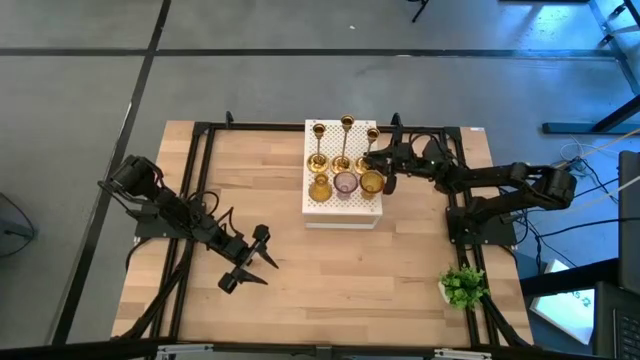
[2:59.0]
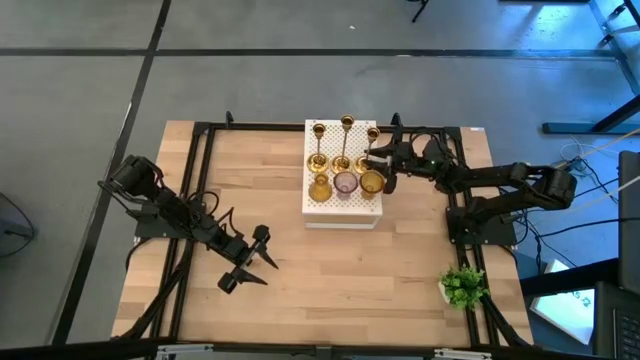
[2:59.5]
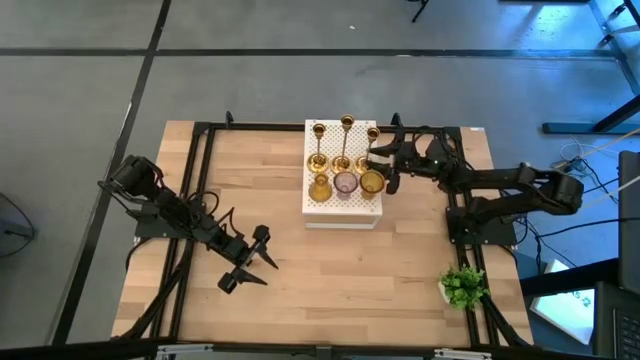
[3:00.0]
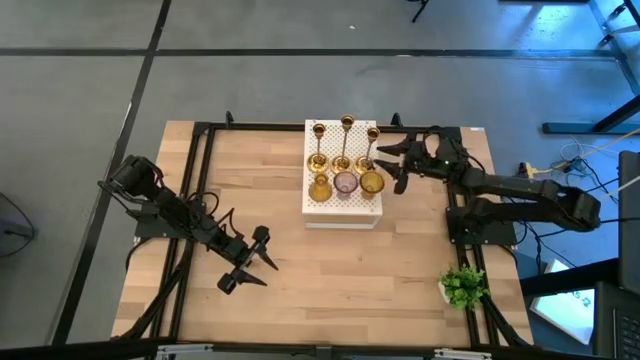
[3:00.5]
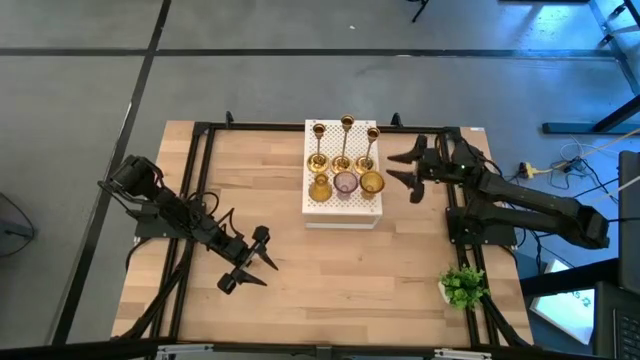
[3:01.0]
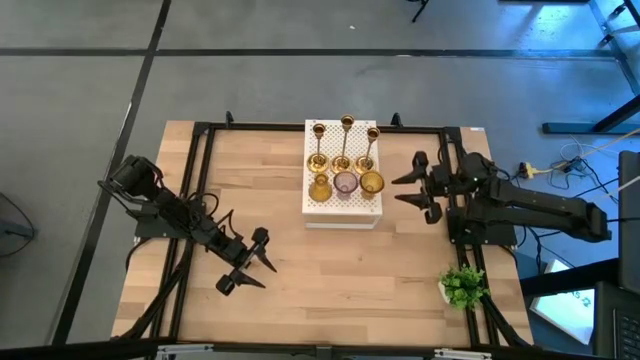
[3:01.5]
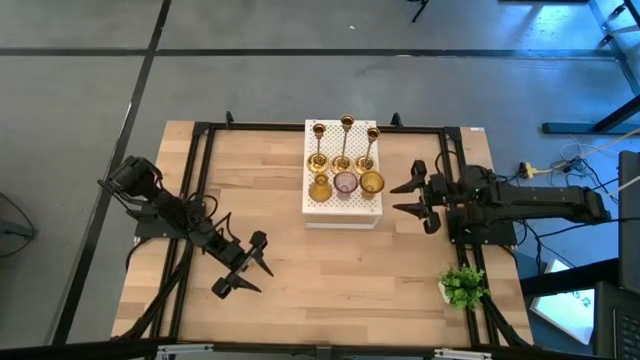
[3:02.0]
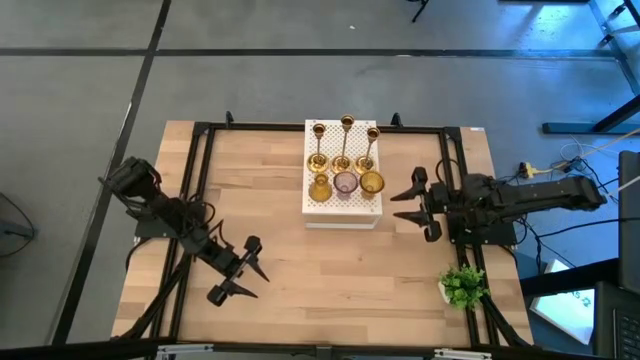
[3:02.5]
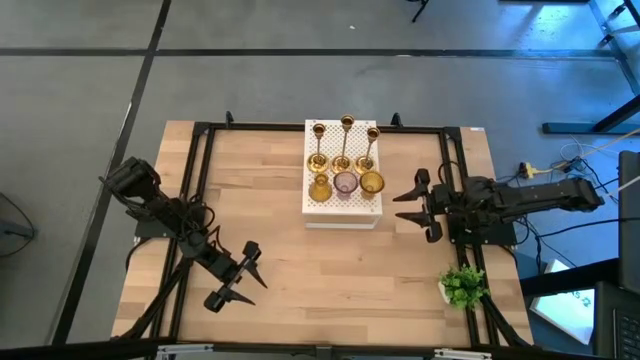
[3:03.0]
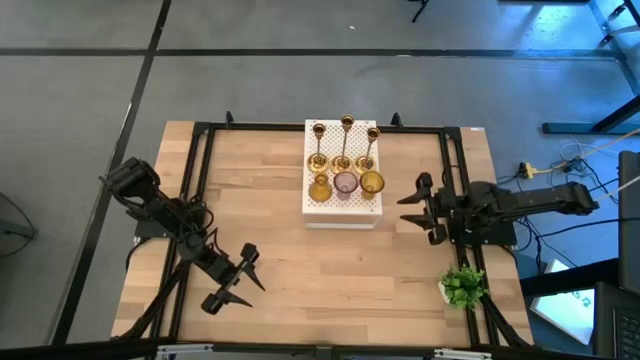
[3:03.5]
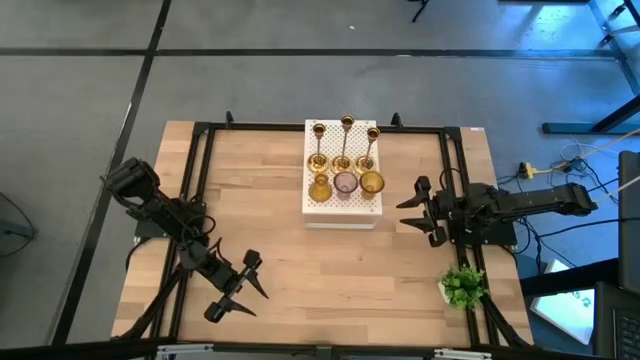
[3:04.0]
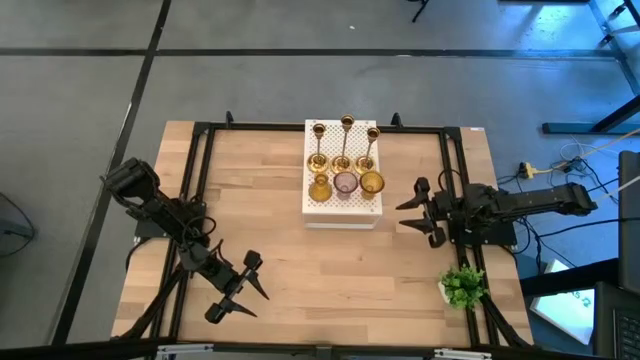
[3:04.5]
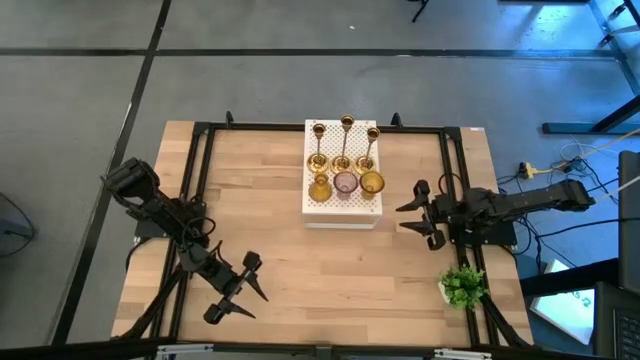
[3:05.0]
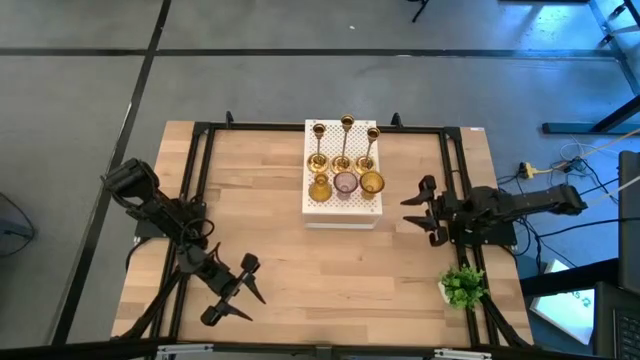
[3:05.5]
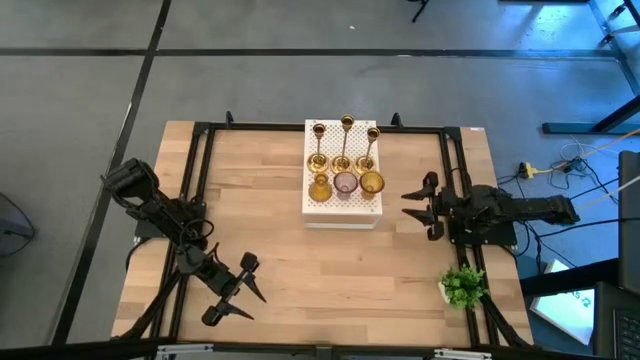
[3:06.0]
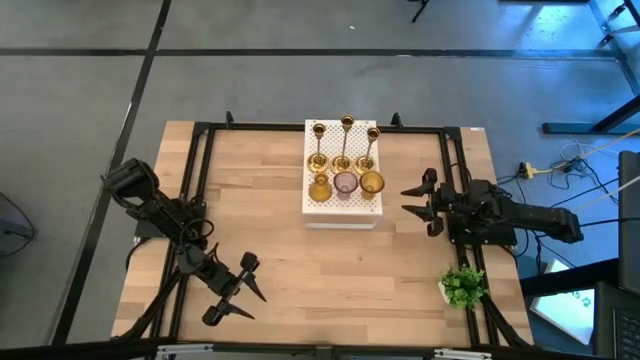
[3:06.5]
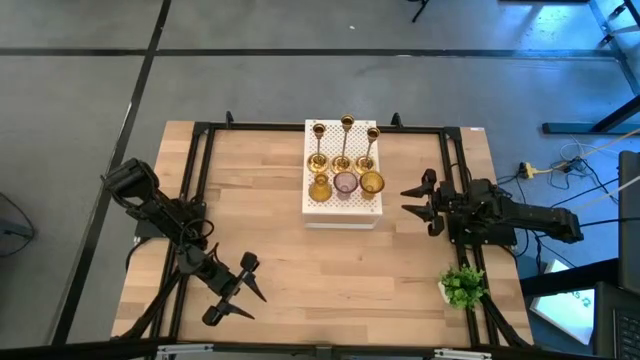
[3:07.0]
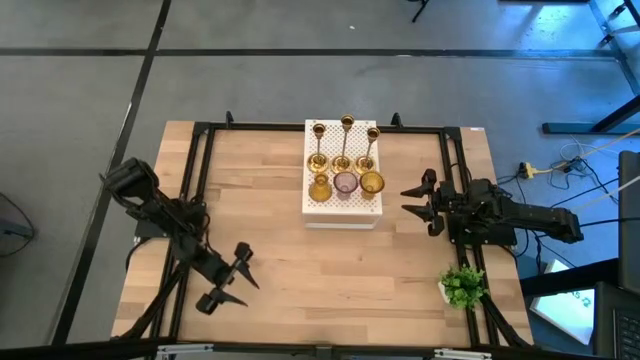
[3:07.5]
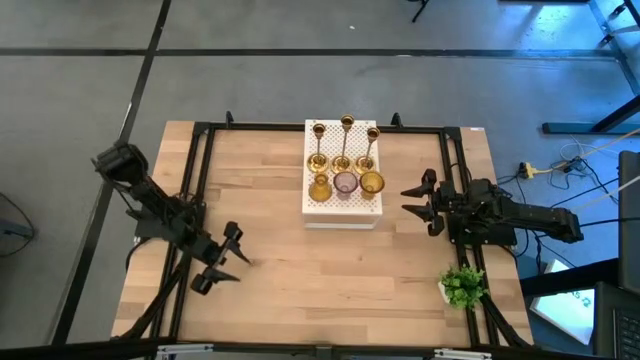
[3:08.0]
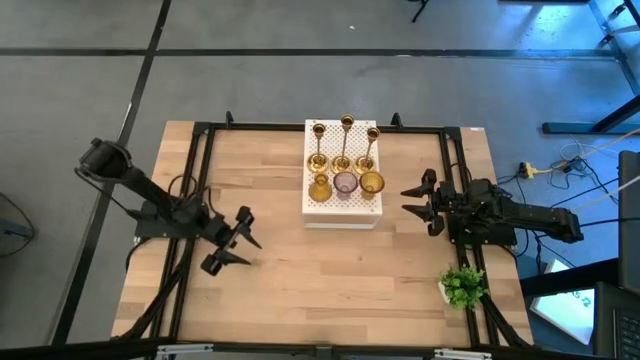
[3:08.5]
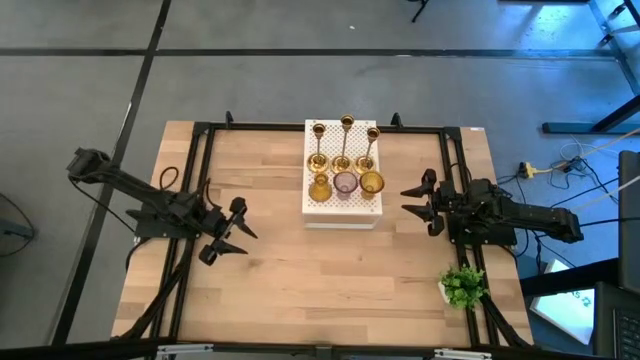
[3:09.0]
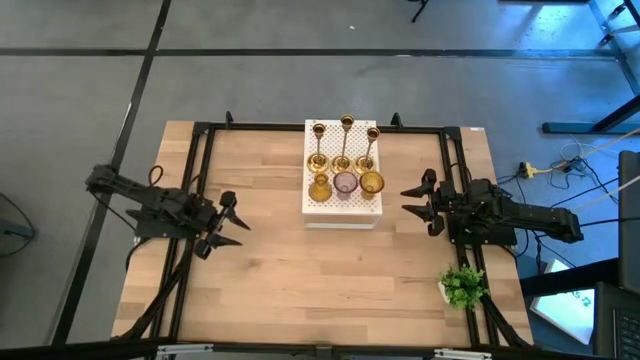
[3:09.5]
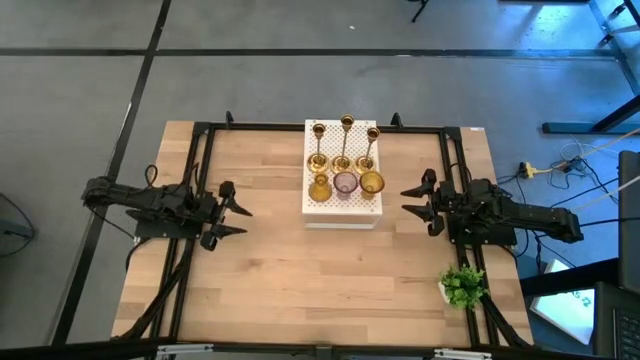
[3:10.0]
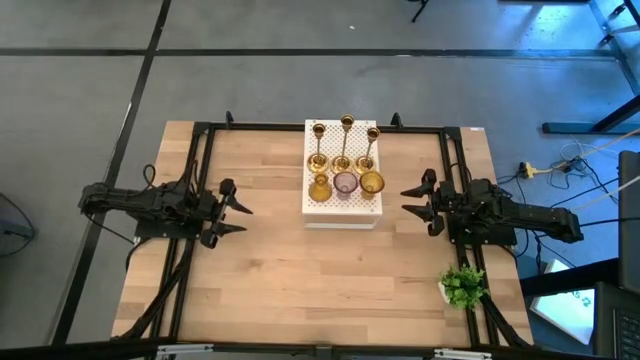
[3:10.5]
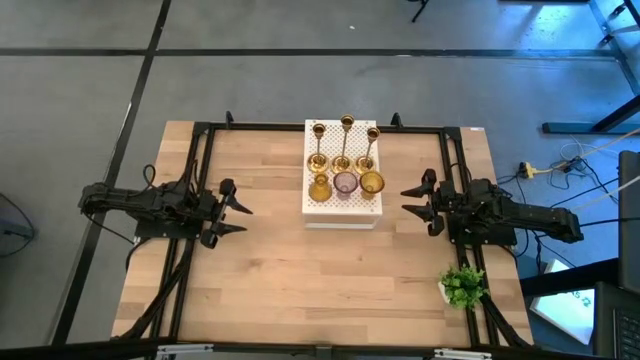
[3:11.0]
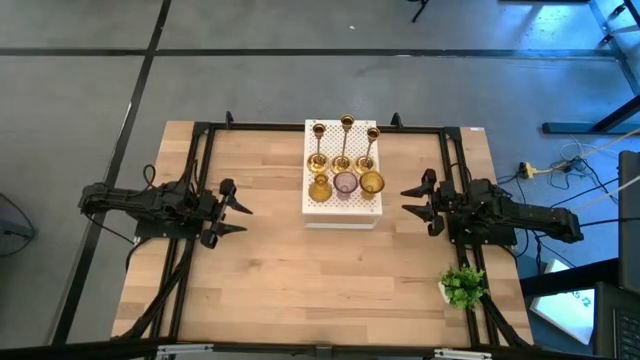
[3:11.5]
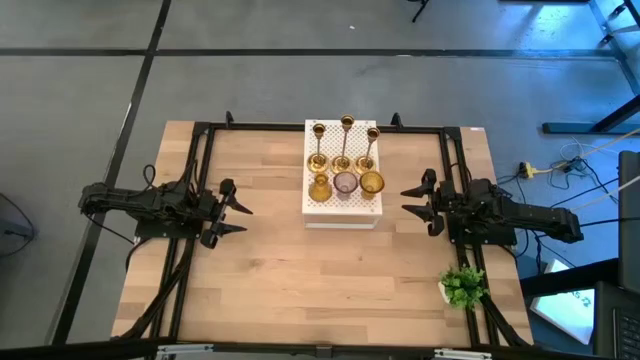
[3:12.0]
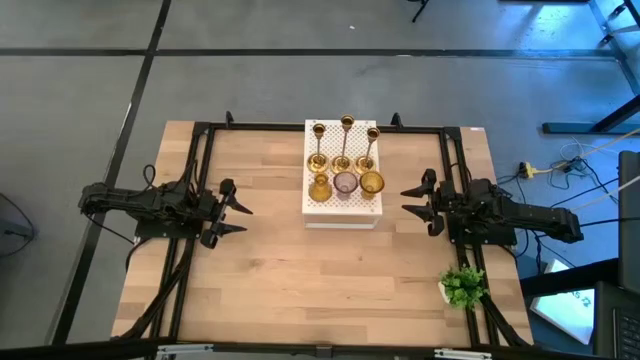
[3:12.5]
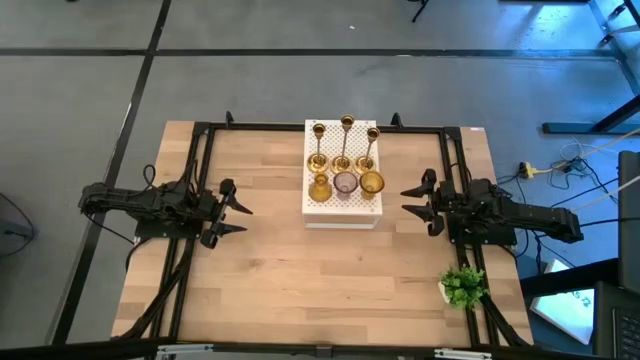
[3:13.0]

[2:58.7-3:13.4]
Task: Pick & Place candle stick holders
Return to Home Position

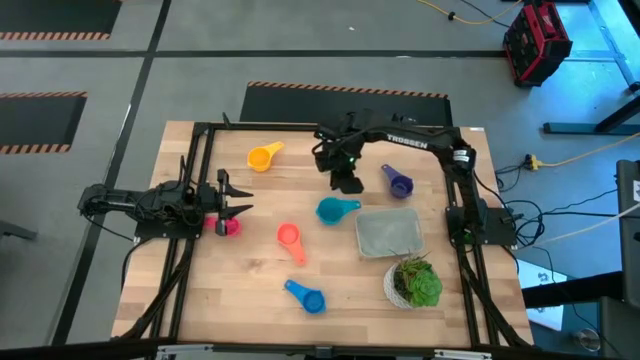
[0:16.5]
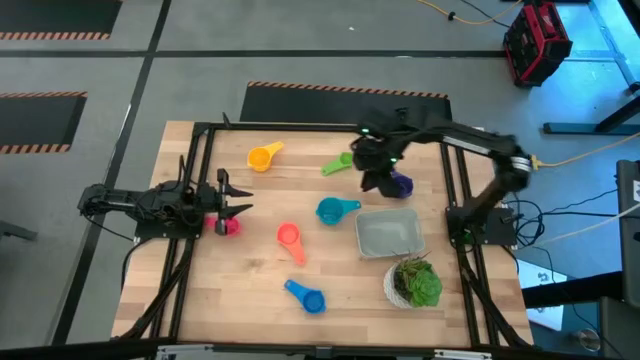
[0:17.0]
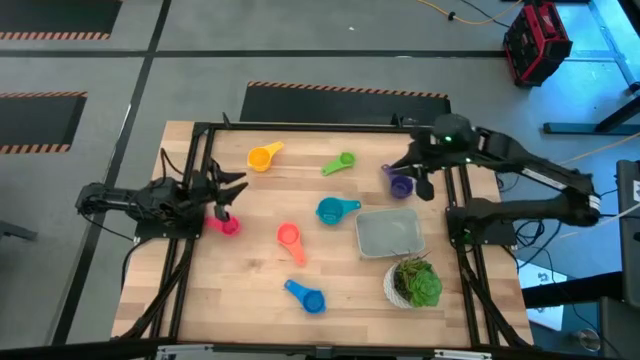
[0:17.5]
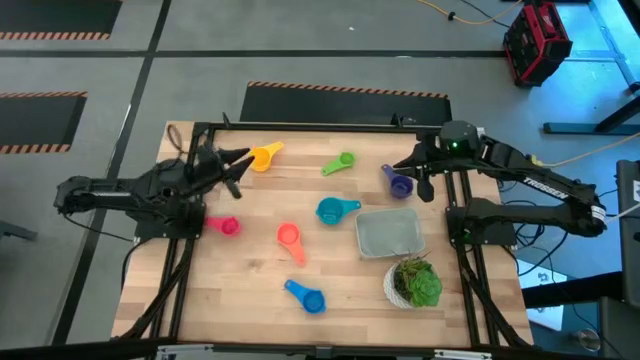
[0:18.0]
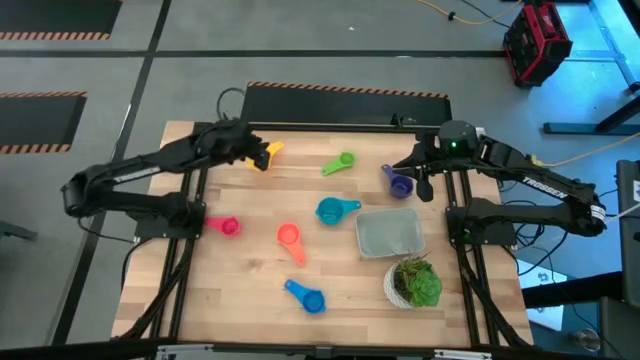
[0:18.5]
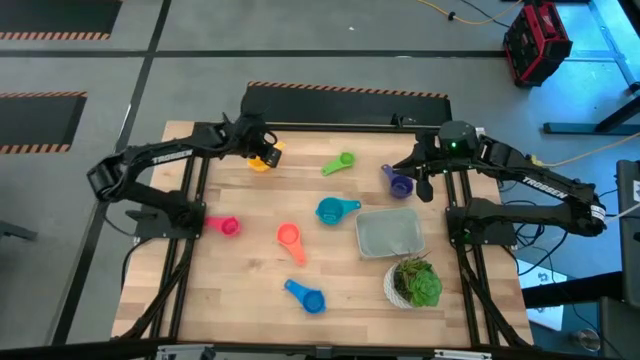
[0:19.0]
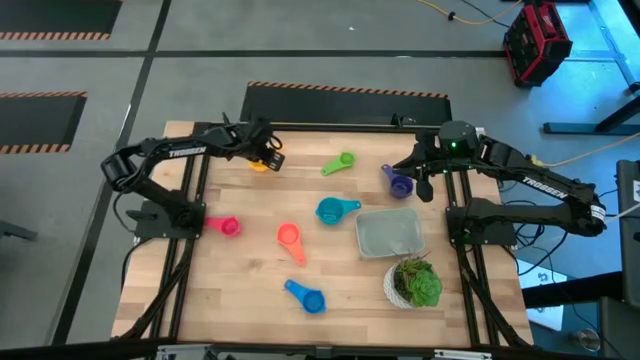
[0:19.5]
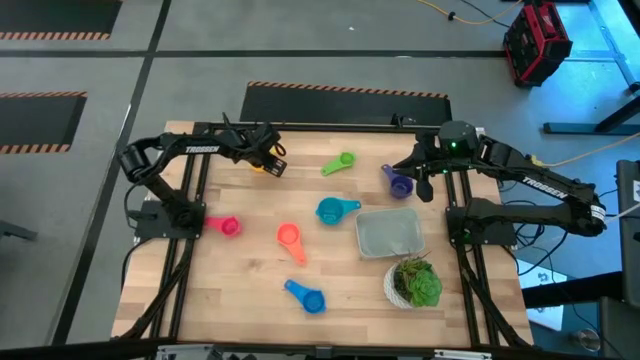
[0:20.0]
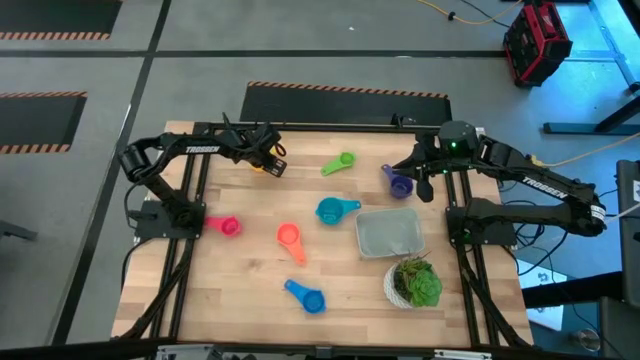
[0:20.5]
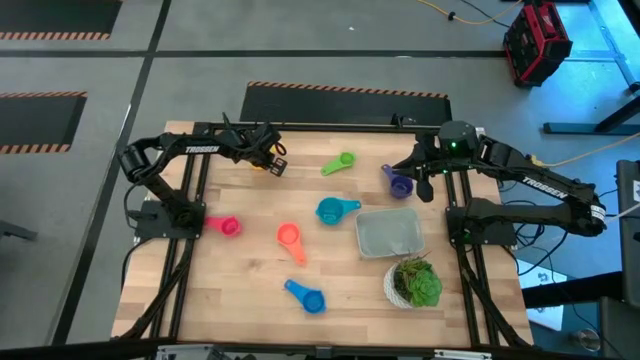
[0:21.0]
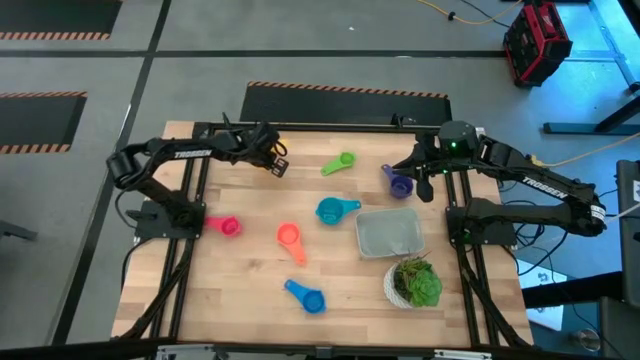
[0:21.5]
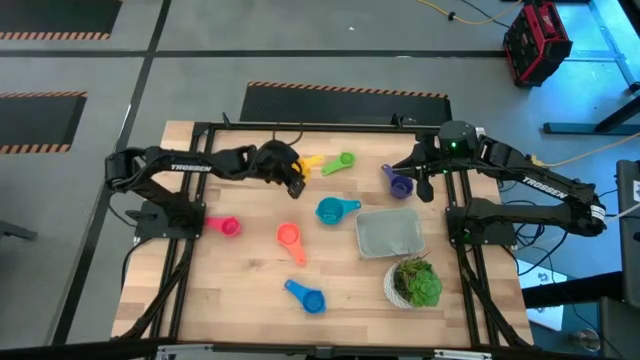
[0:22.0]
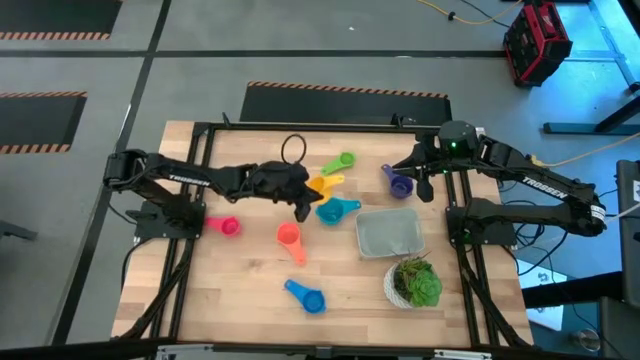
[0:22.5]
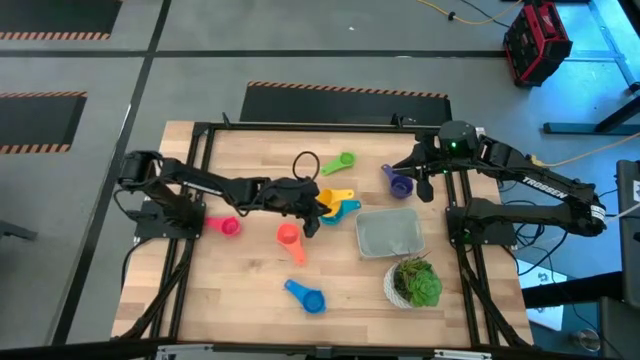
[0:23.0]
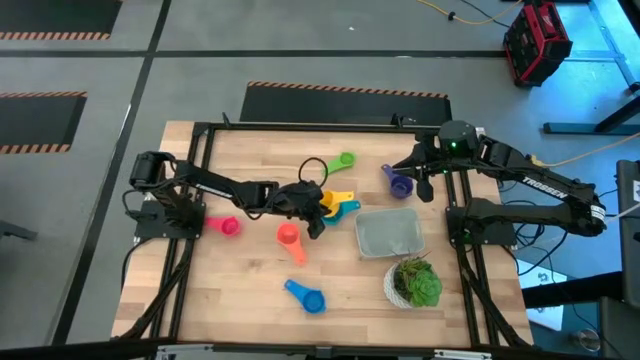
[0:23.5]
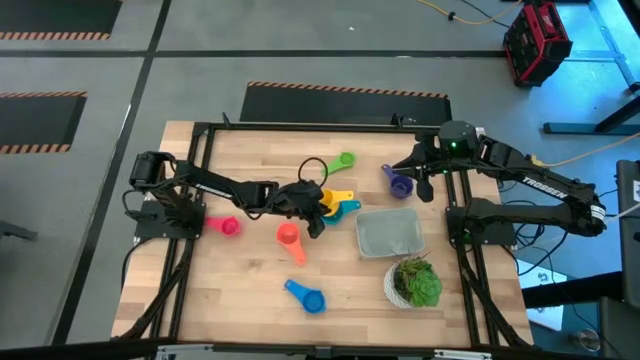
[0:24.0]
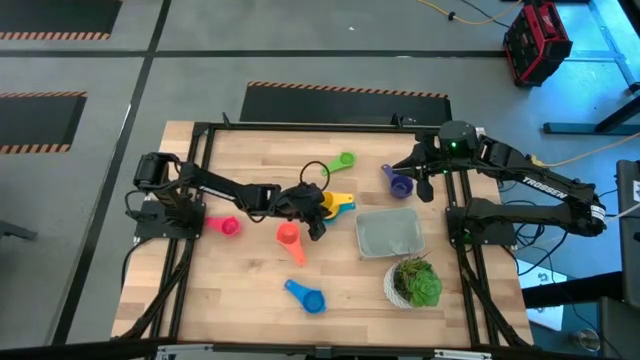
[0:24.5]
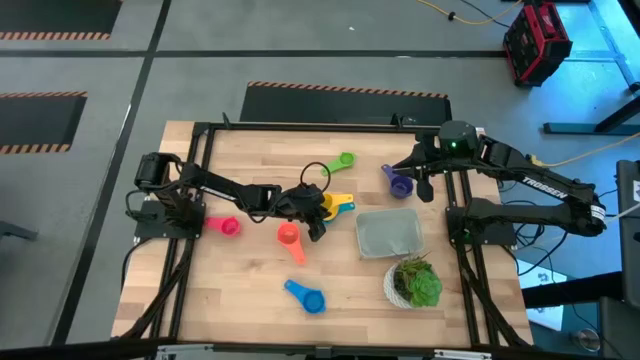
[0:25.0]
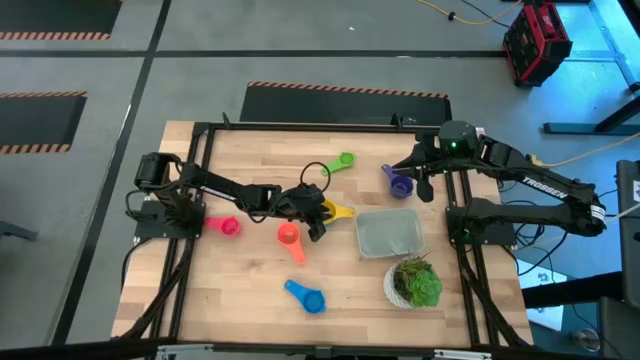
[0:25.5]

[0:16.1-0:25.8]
Task: Nest measuring cups in basket
Stack the yellow measuring cup on top of the light blue measuring cup
